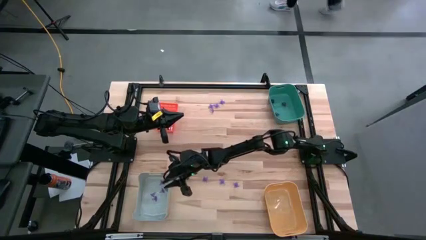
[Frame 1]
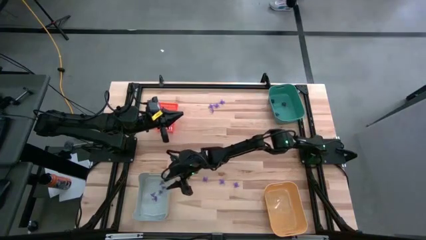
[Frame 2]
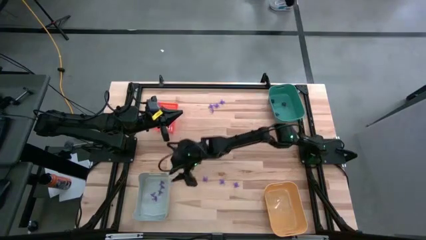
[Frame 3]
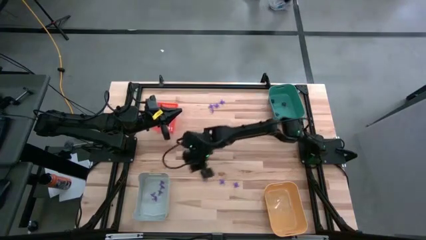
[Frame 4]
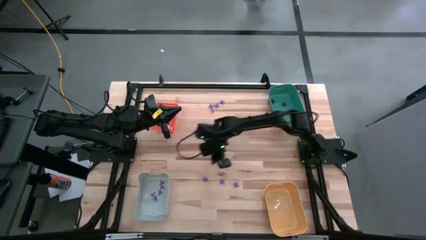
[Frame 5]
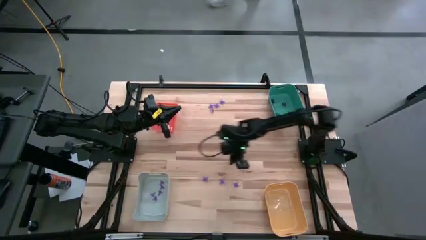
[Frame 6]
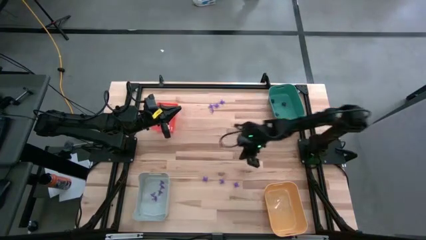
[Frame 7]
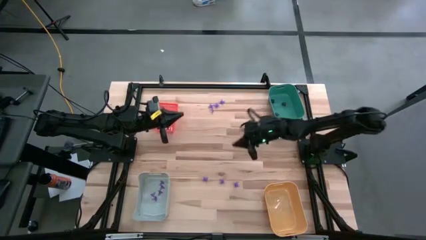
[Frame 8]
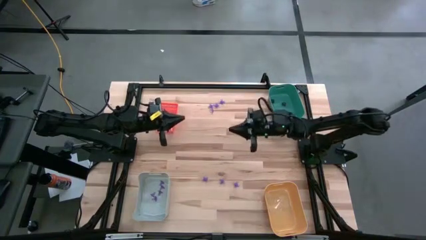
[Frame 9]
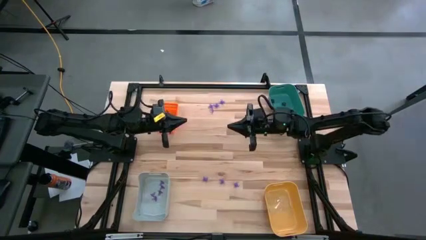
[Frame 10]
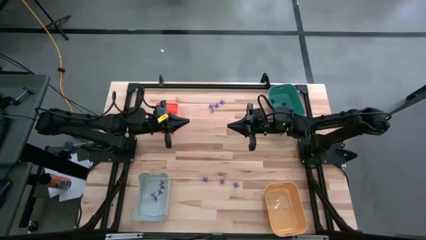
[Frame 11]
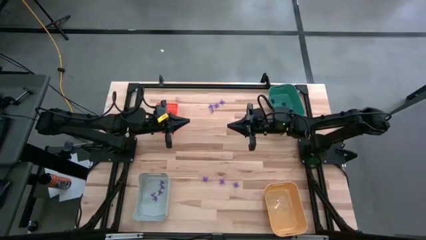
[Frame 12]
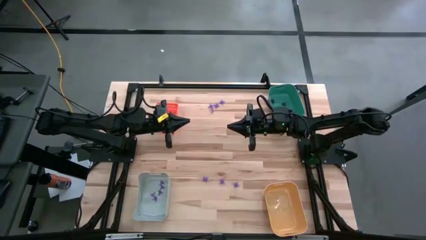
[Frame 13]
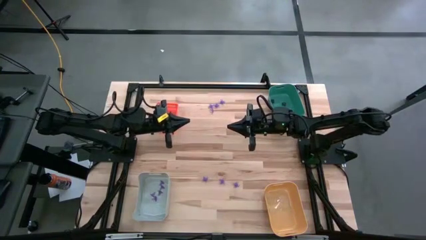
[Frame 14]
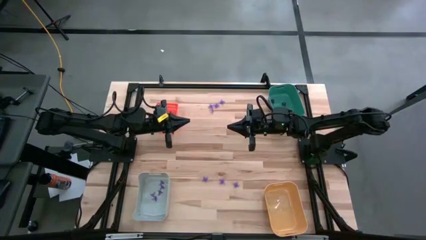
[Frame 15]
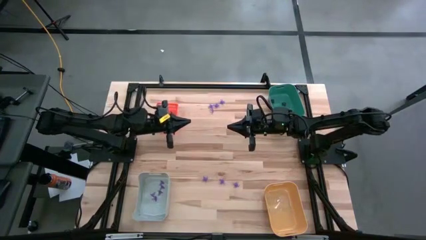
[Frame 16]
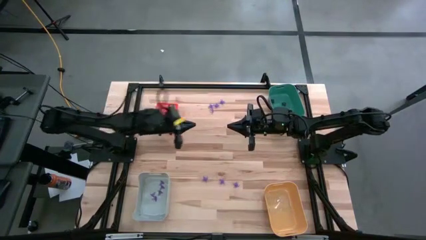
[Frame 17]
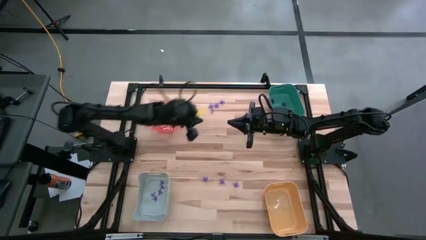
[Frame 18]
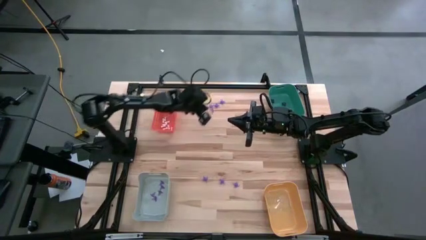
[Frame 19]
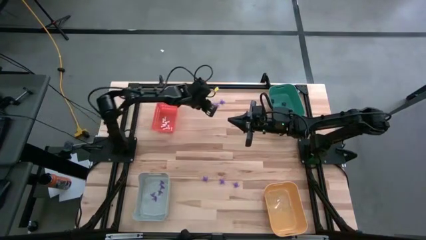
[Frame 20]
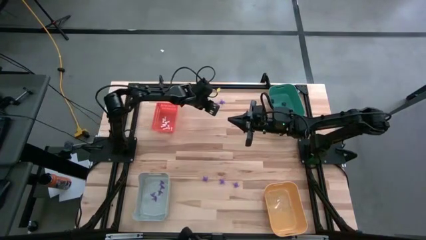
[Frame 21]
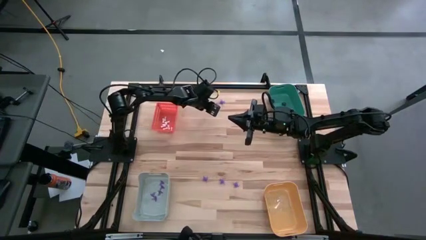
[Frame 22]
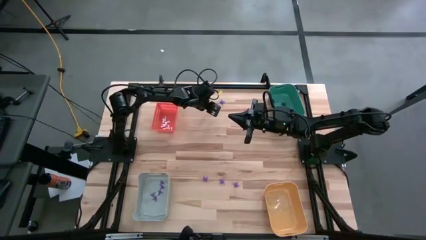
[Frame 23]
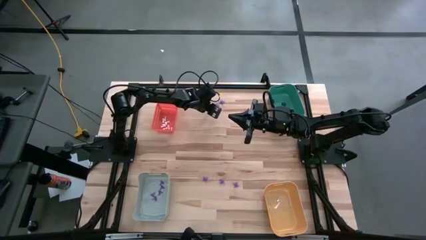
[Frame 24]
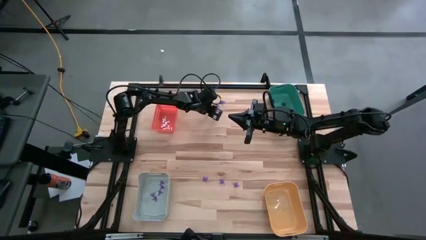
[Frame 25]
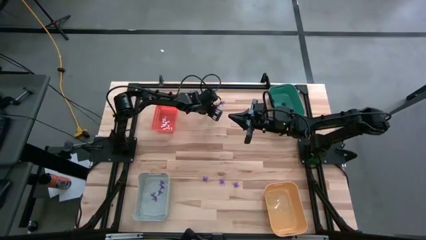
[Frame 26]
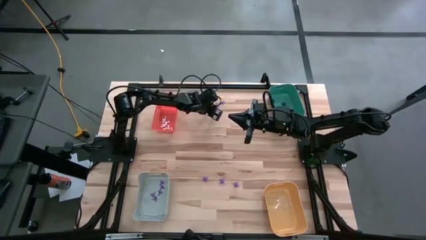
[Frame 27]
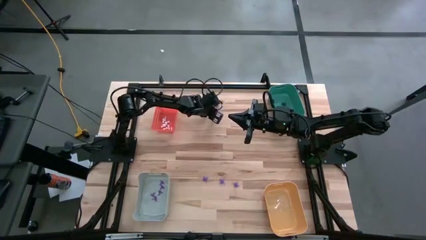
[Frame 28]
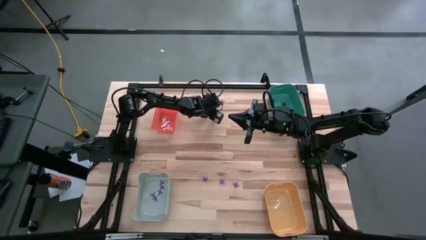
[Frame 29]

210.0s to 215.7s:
Task: Sort Halloween decoration
Put the violet hat toy into the gray bin

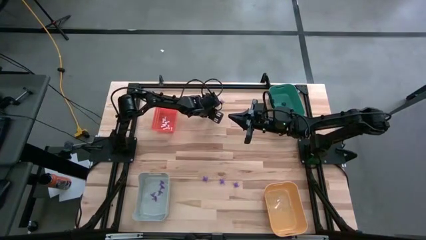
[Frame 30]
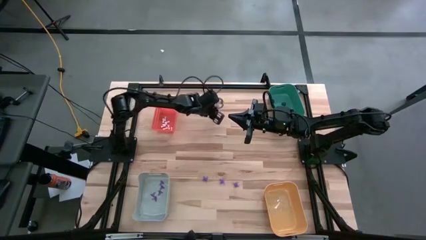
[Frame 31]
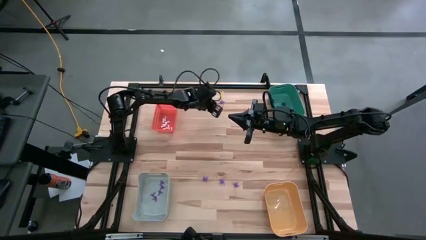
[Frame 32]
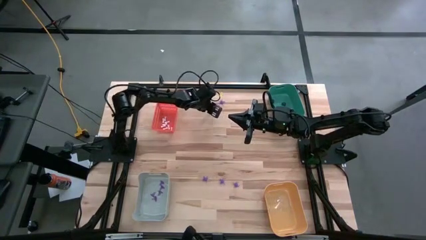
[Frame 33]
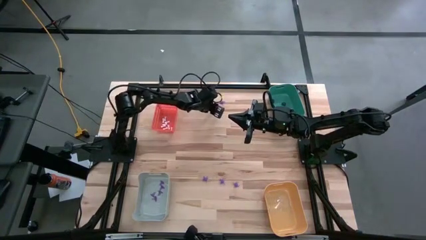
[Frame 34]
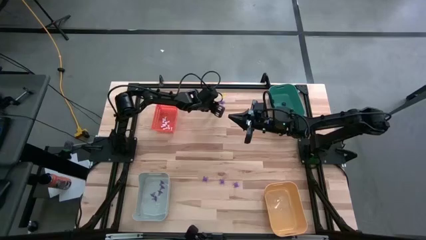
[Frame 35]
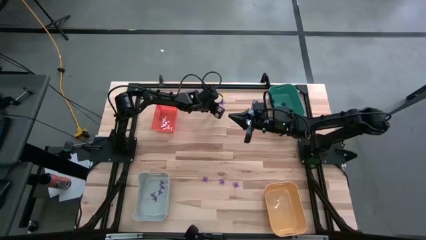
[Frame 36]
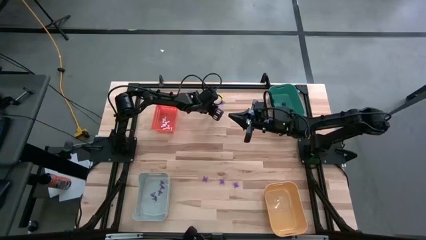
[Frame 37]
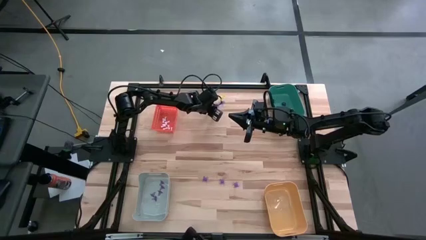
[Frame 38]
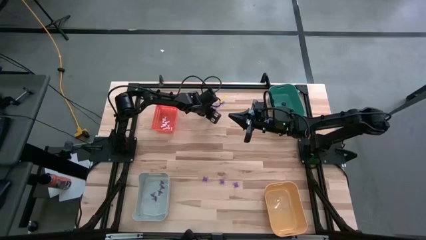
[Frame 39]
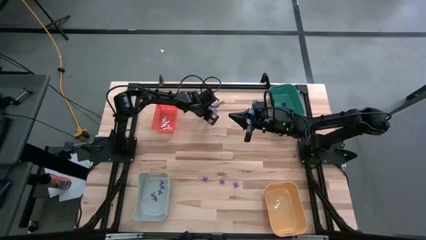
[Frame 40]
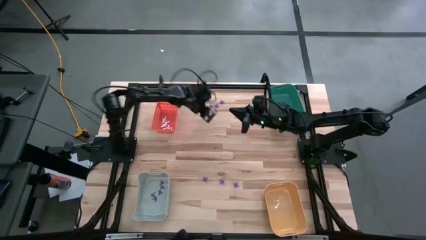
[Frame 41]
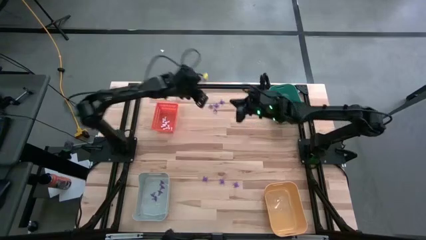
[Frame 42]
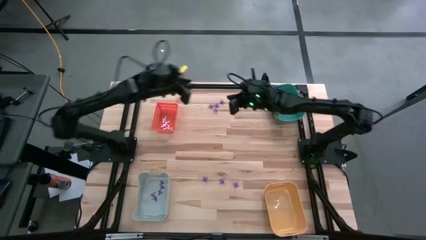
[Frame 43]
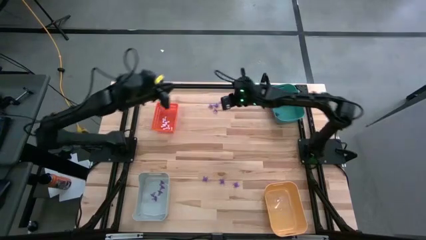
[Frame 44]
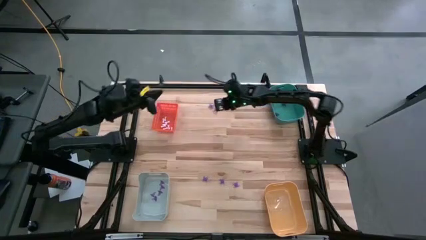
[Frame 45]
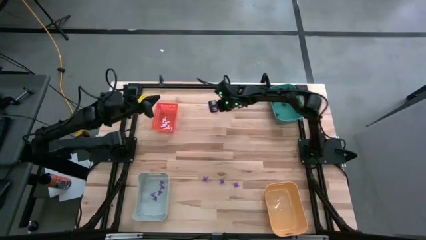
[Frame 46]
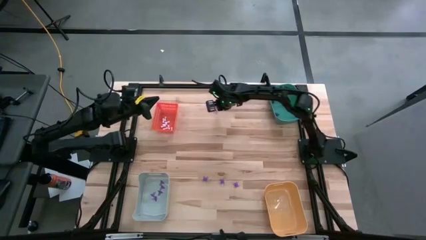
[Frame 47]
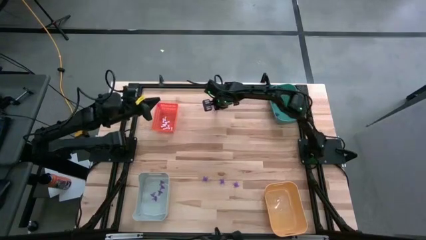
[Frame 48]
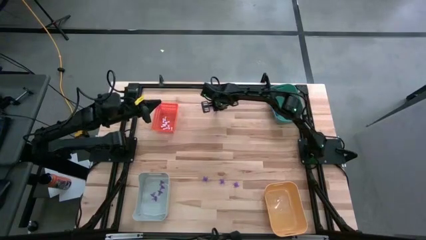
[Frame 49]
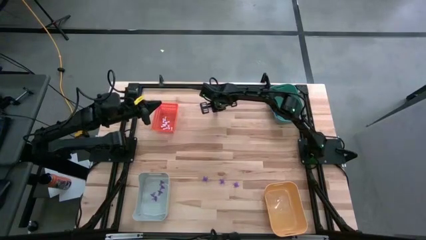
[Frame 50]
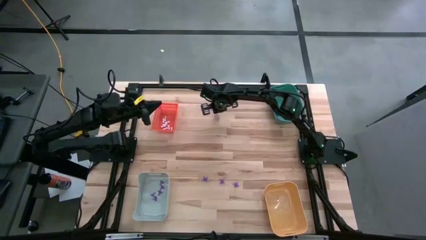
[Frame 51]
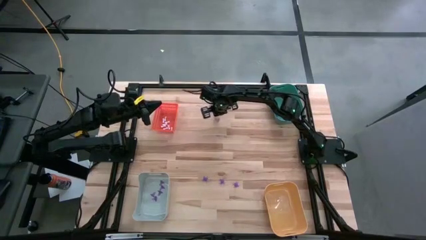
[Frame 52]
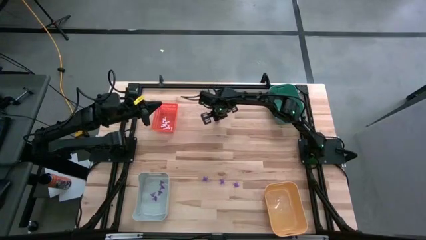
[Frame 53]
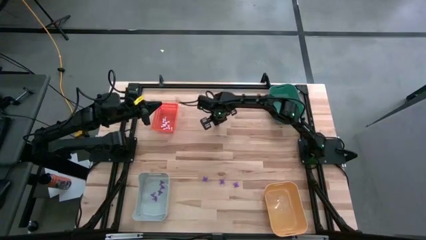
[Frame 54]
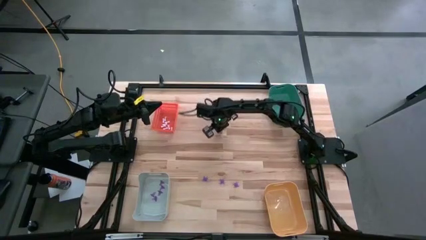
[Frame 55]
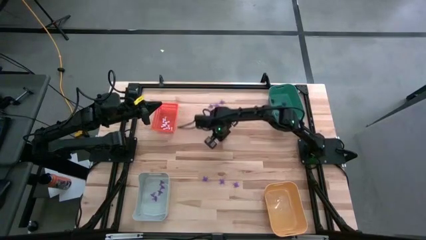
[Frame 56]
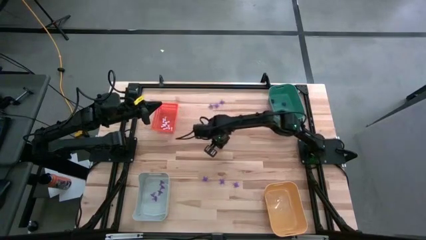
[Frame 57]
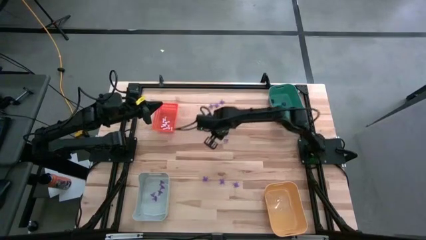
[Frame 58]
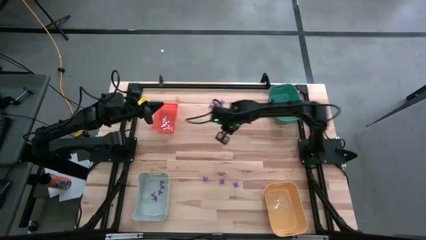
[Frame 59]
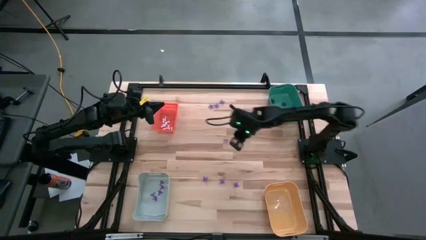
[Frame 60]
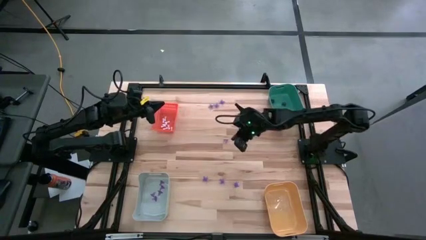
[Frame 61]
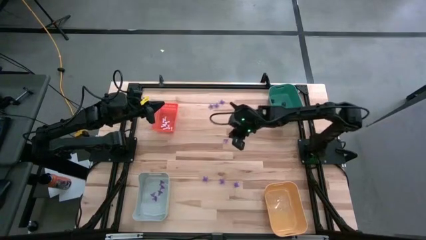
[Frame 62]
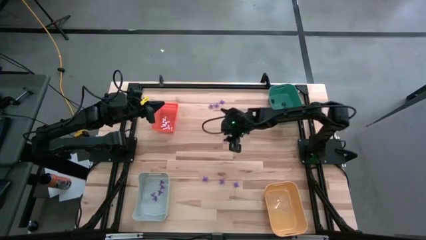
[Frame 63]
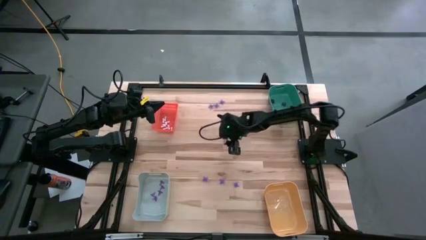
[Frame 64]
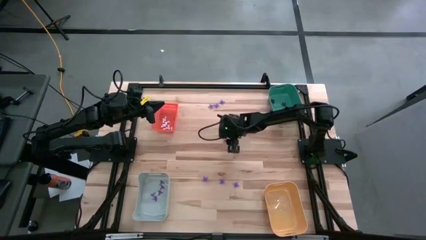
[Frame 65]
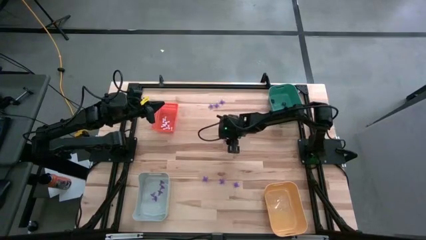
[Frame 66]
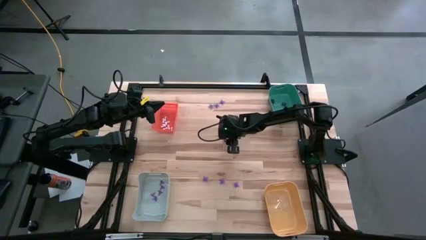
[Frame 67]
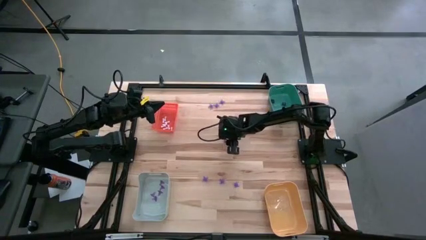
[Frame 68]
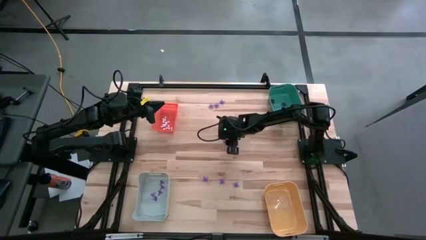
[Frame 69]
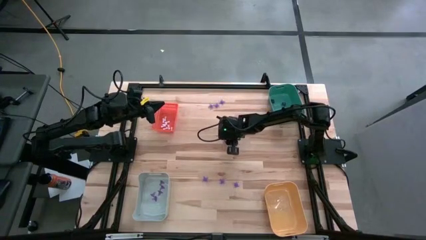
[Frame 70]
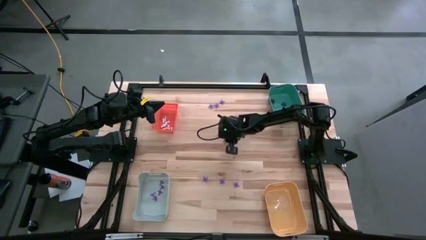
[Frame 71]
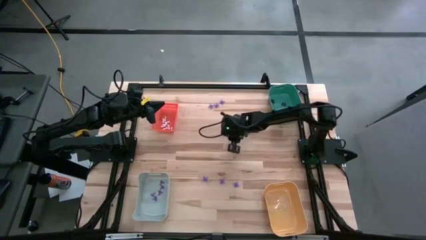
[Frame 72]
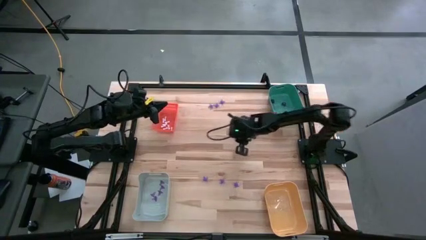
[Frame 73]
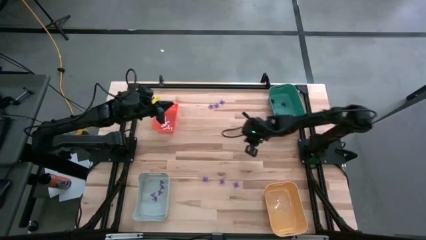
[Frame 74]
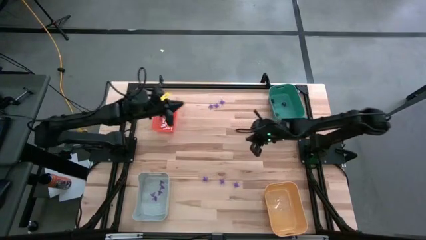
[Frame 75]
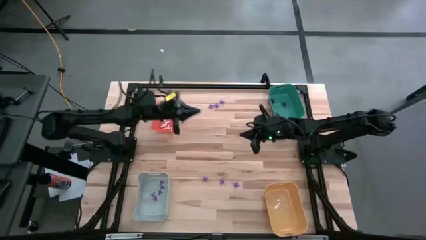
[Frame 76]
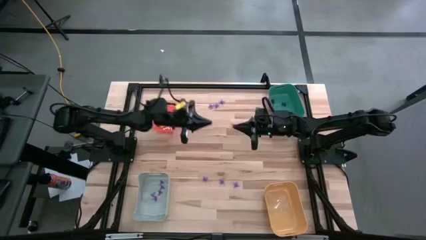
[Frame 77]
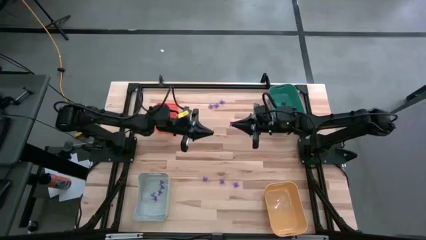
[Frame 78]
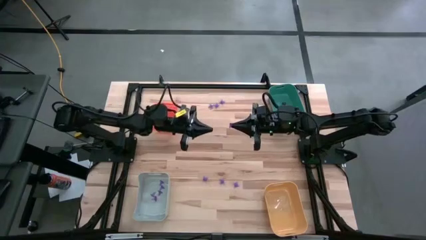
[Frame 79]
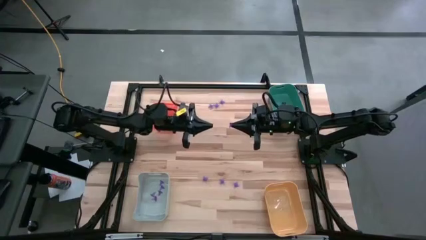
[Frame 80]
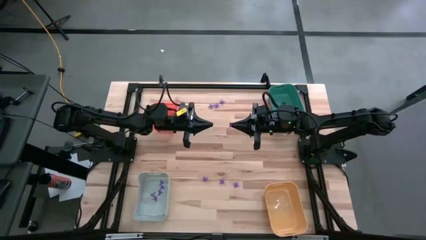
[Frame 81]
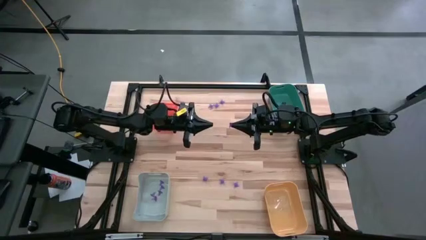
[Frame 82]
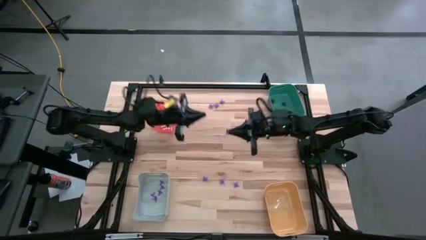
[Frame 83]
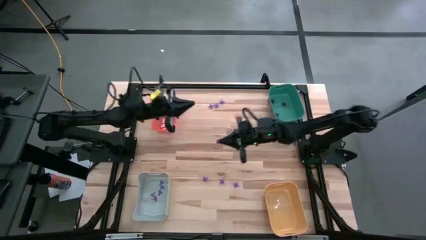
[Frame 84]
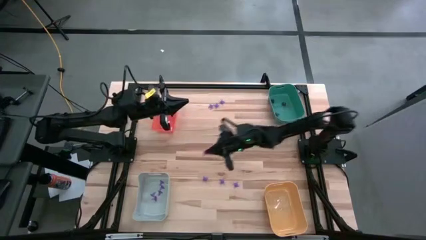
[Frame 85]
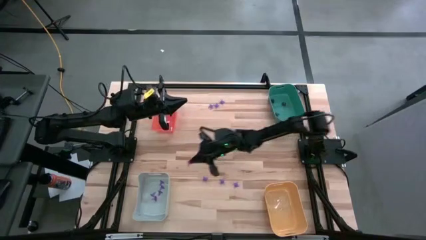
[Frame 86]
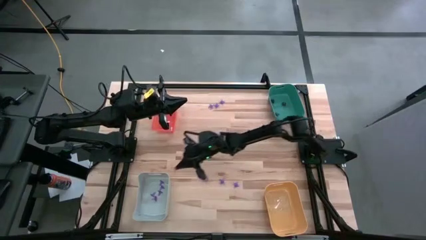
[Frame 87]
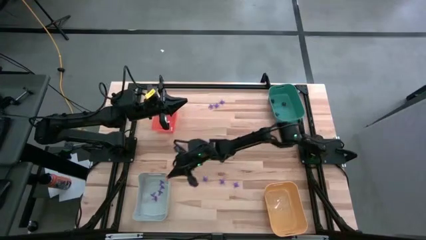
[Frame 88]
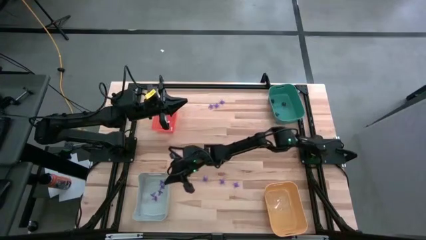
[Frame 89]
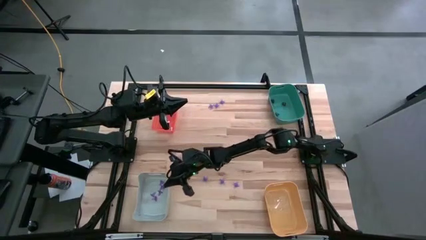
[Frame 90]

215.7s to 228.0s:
Put the violet hat toy into the gray bin
